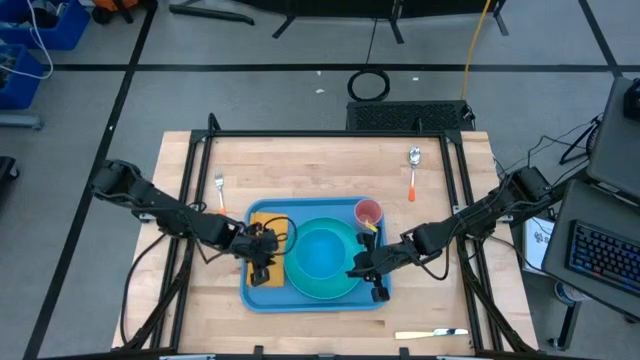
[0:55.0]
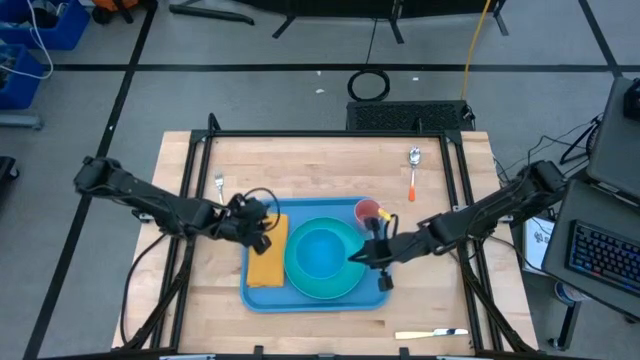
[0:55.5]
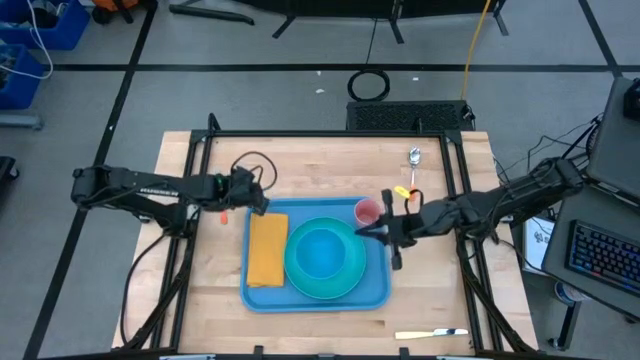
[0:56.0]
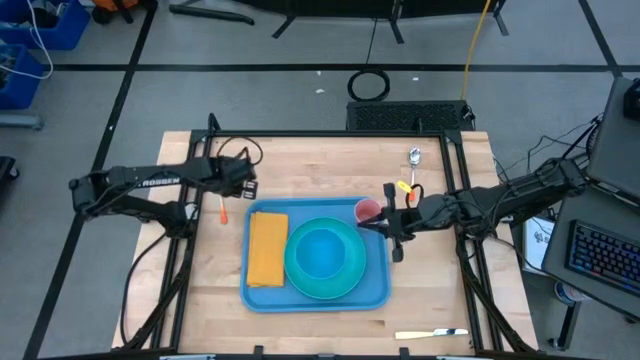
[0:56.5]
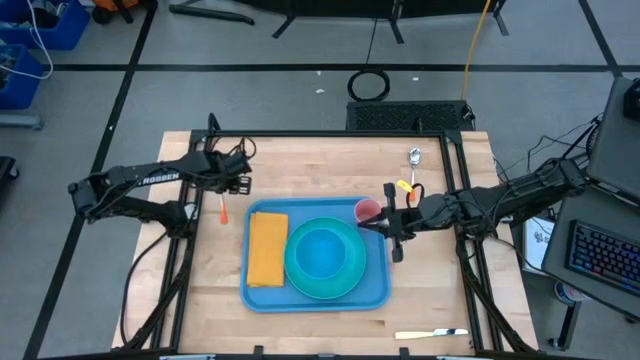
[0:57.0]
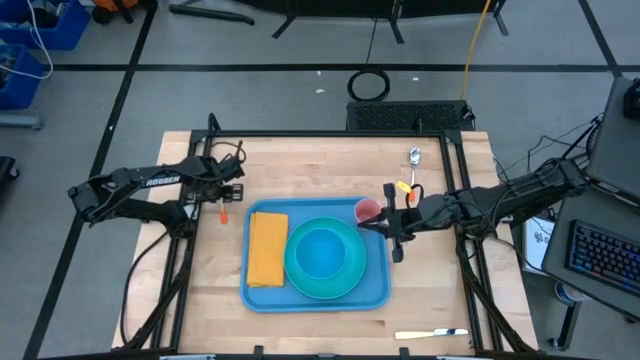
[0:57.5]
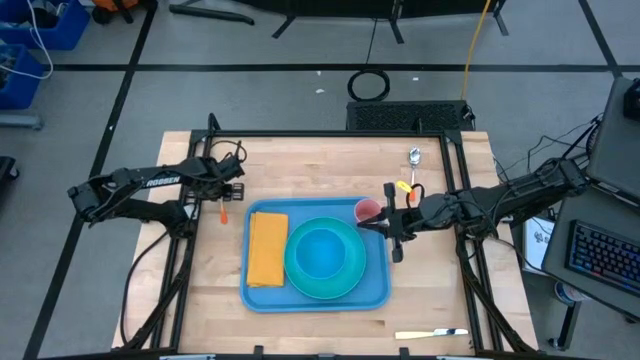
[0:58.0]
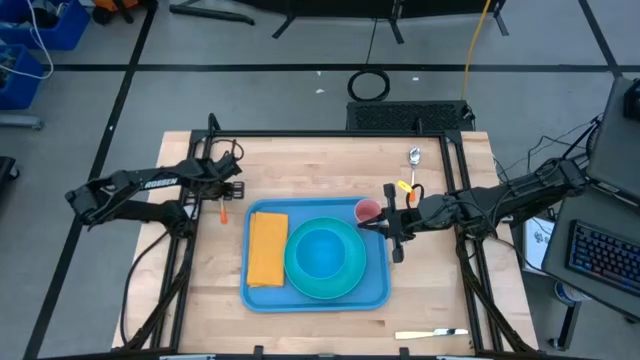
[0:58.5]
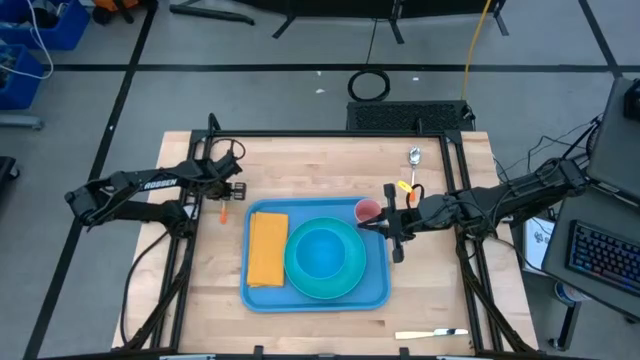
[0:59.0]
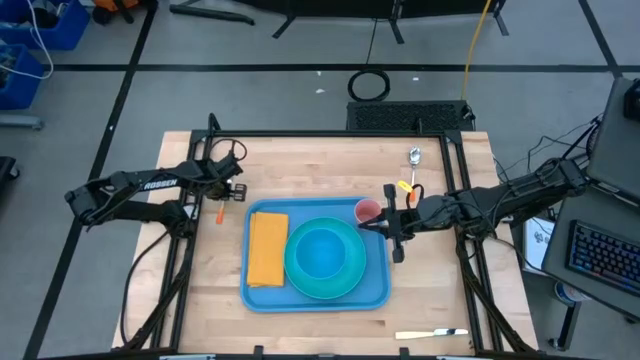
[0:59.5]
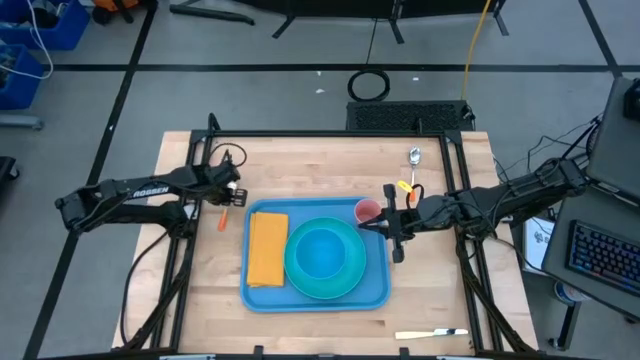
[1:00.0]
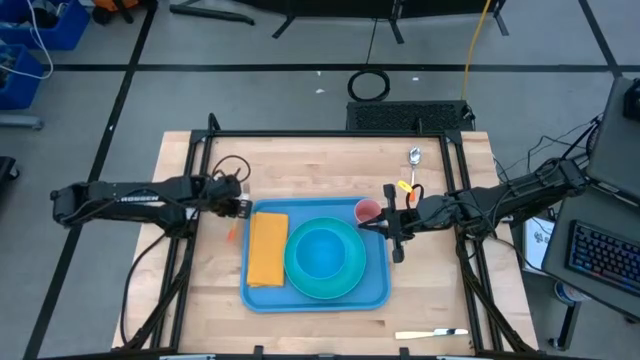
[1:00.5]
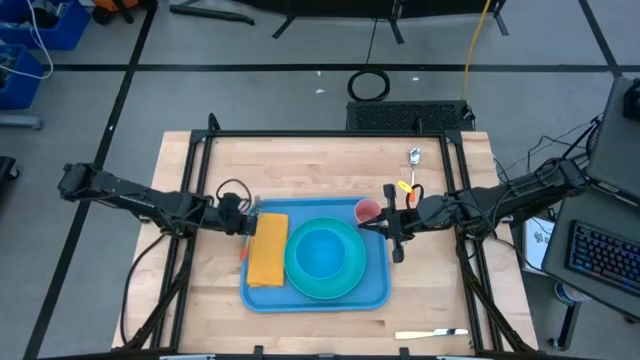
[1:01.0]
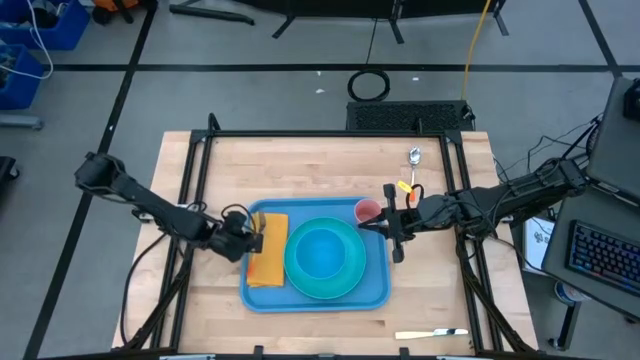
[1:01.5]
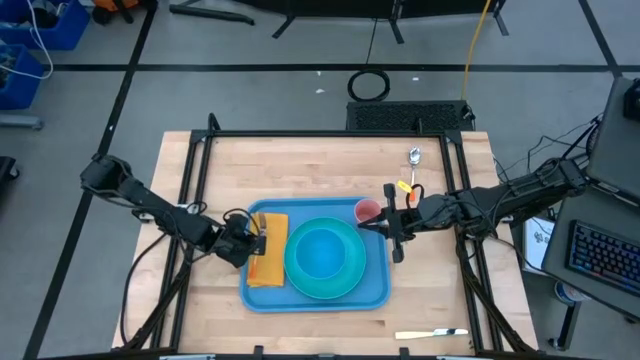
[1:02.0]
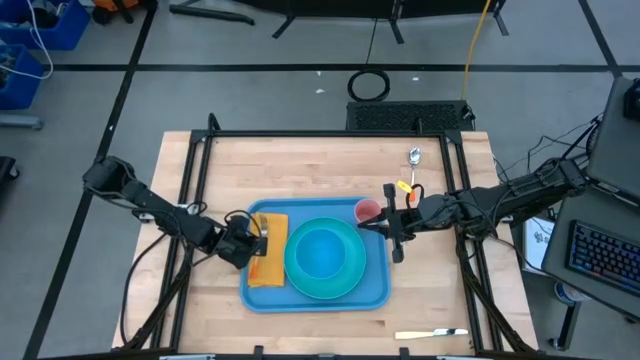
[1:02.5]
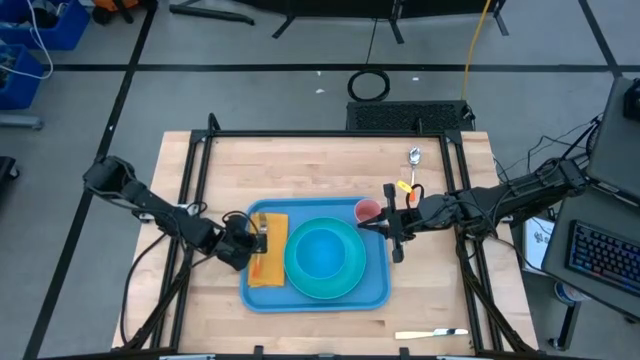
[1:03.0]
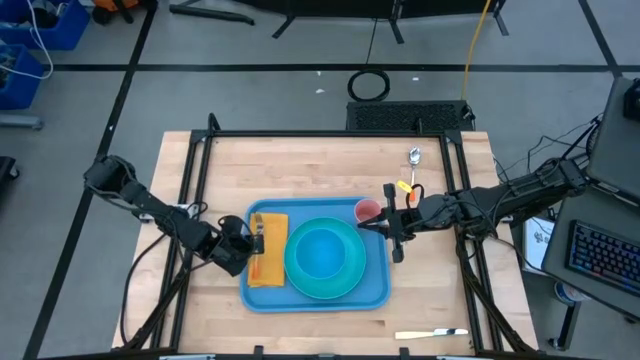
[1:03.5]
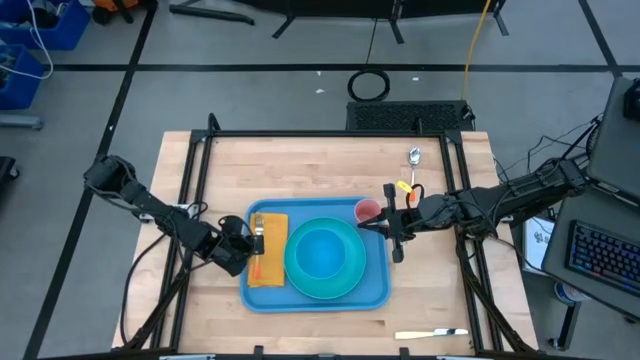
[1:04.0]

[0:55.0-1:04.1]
Task: Set up tray
Put the fork on top of the yellow napkin

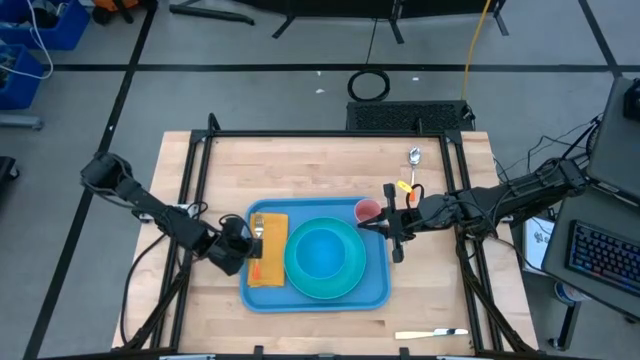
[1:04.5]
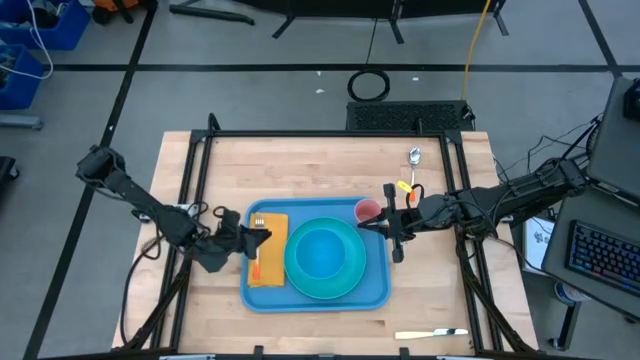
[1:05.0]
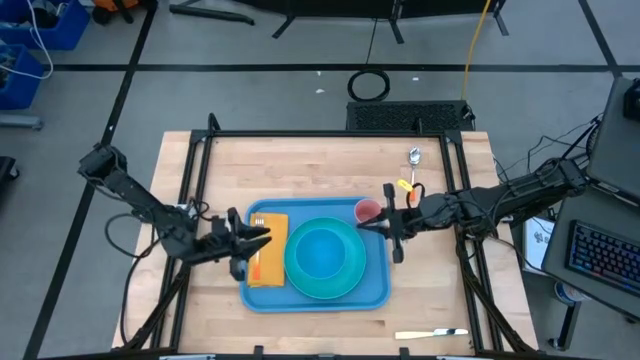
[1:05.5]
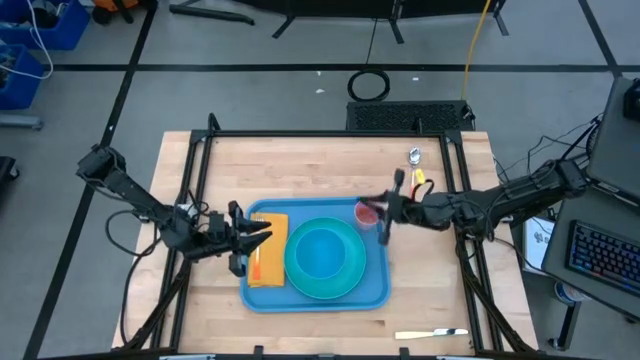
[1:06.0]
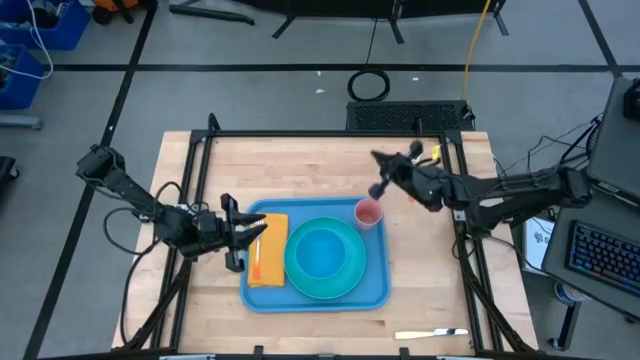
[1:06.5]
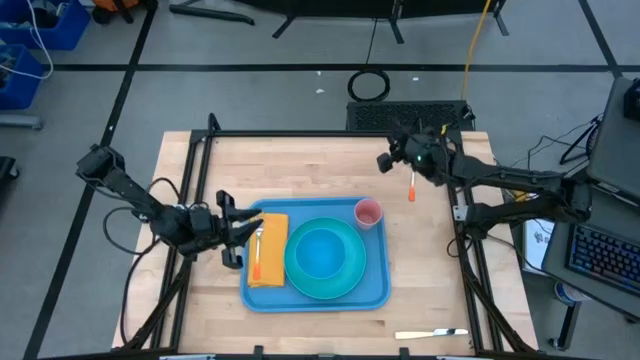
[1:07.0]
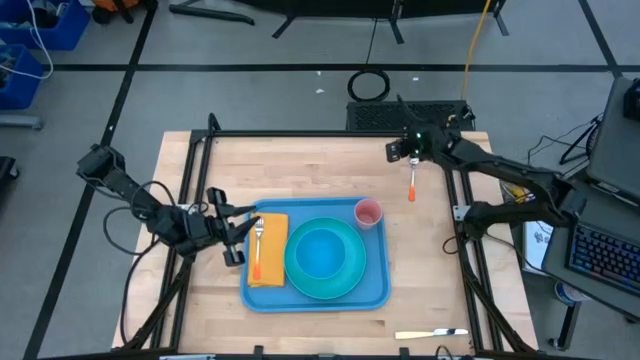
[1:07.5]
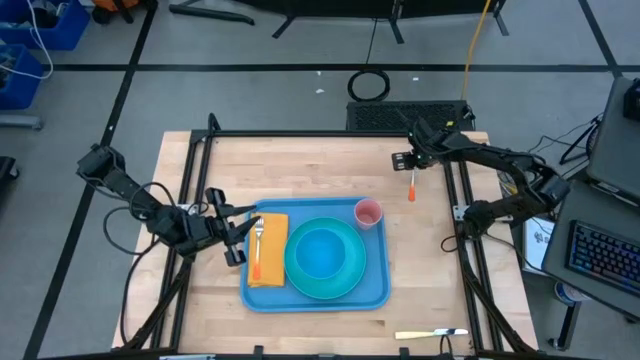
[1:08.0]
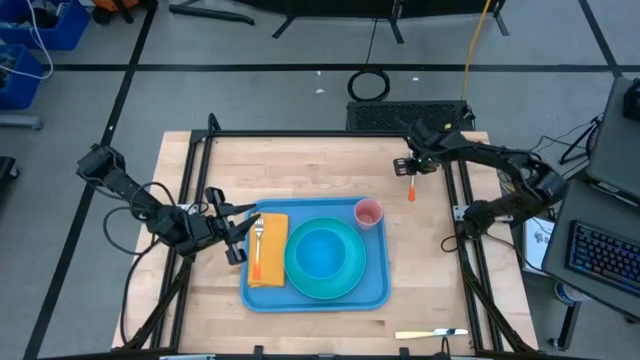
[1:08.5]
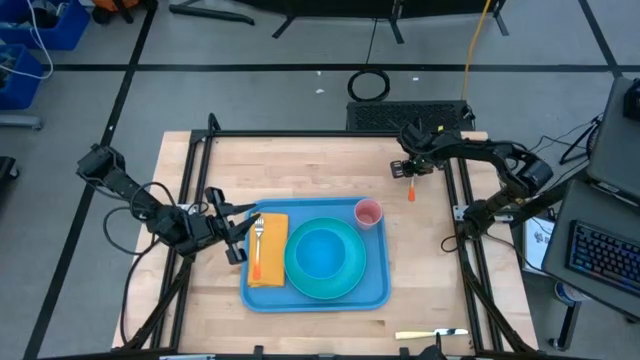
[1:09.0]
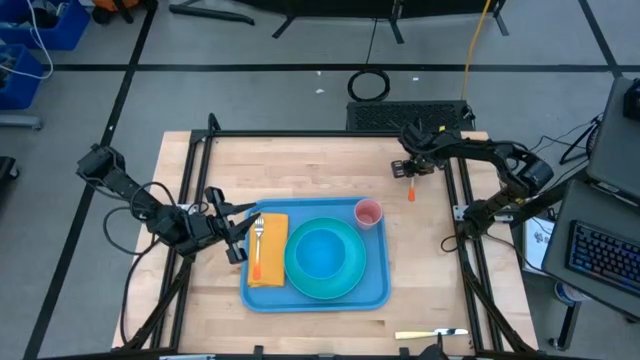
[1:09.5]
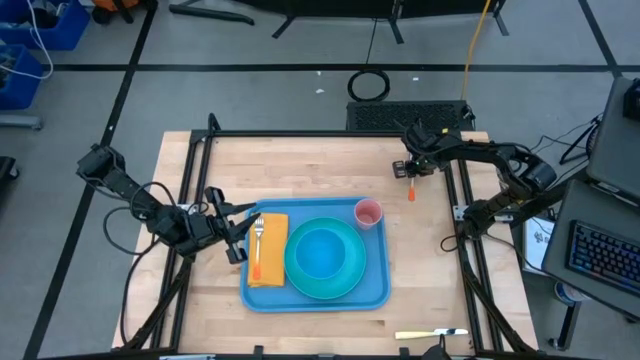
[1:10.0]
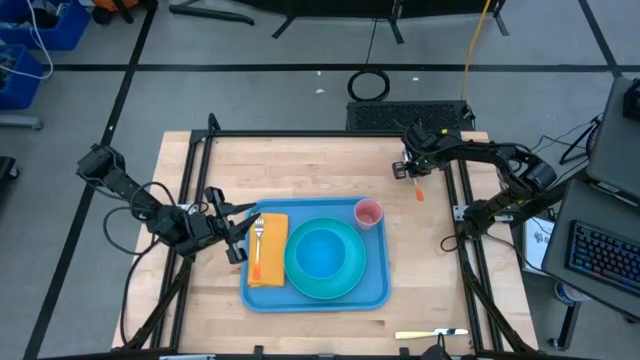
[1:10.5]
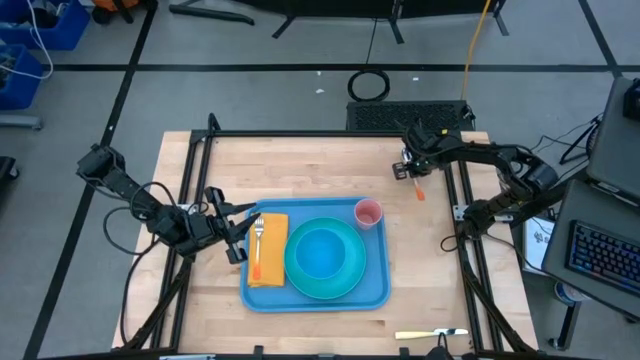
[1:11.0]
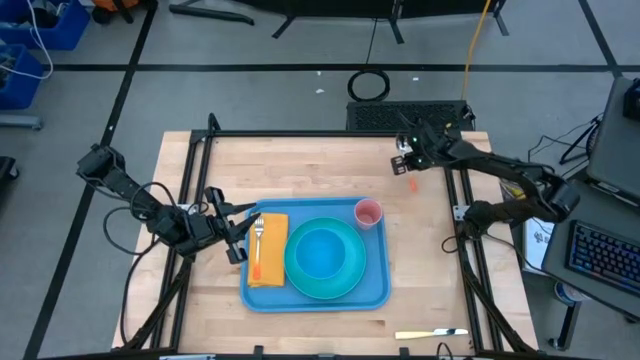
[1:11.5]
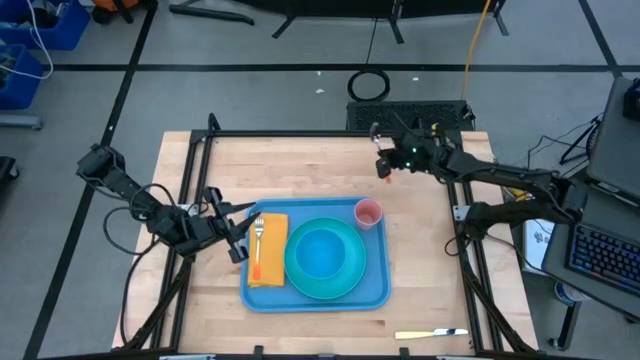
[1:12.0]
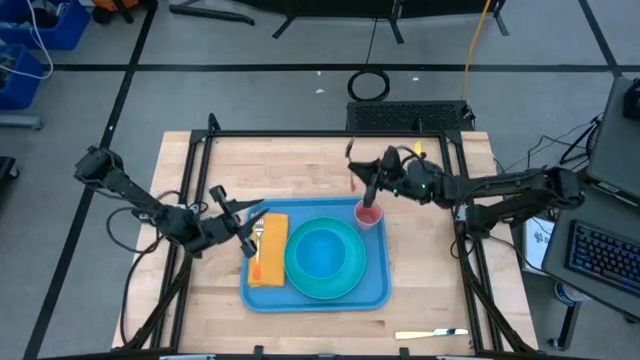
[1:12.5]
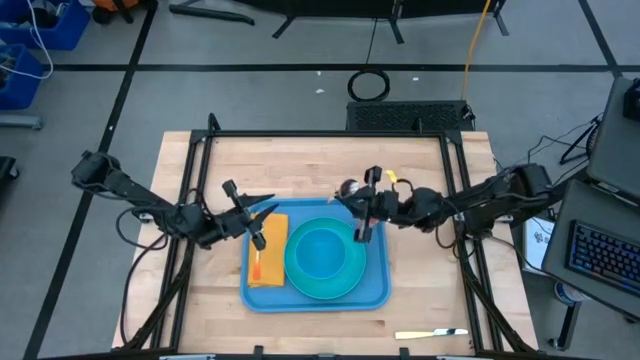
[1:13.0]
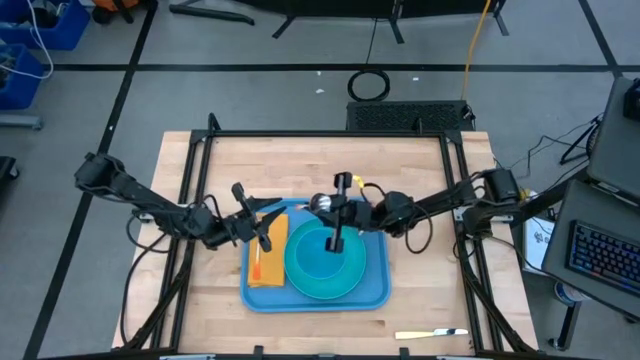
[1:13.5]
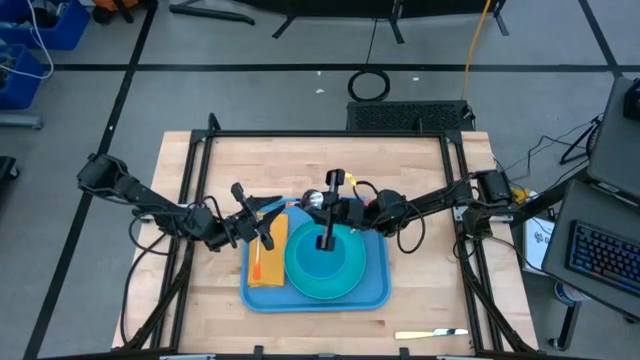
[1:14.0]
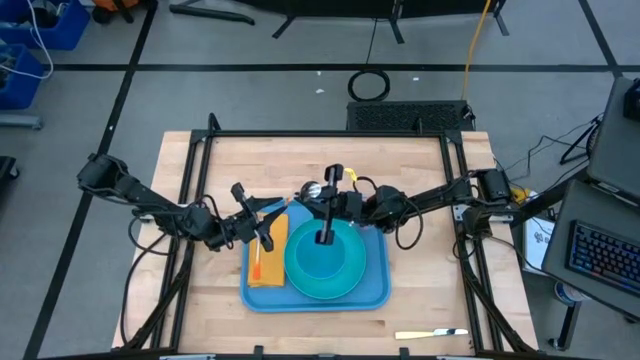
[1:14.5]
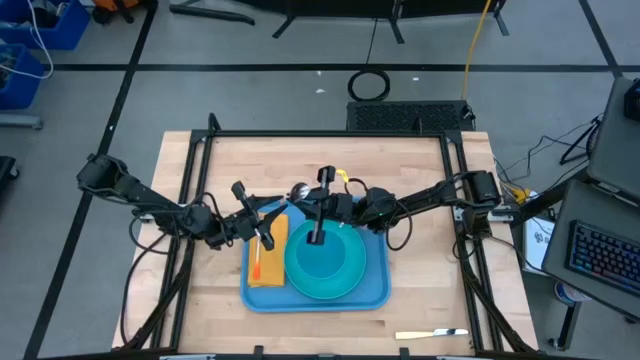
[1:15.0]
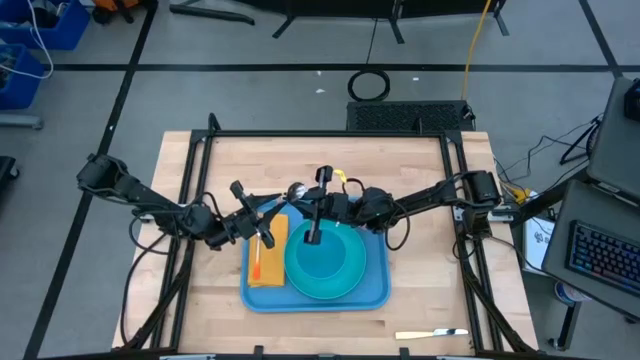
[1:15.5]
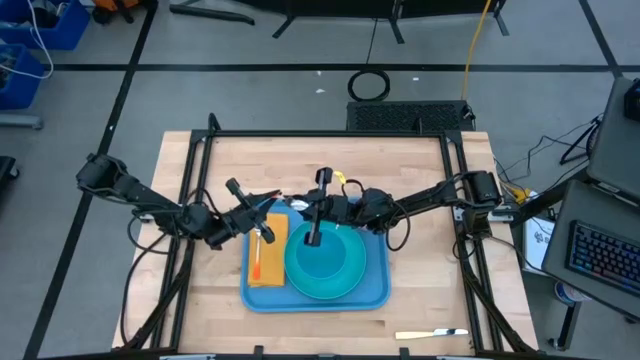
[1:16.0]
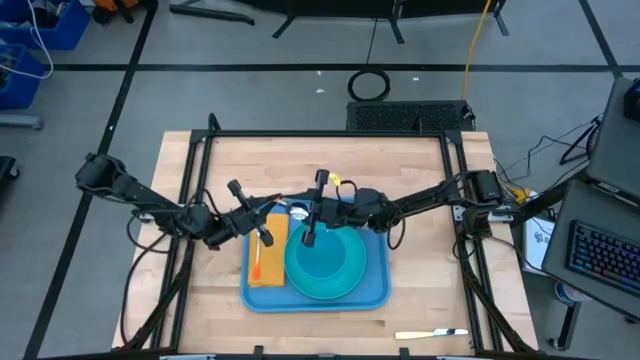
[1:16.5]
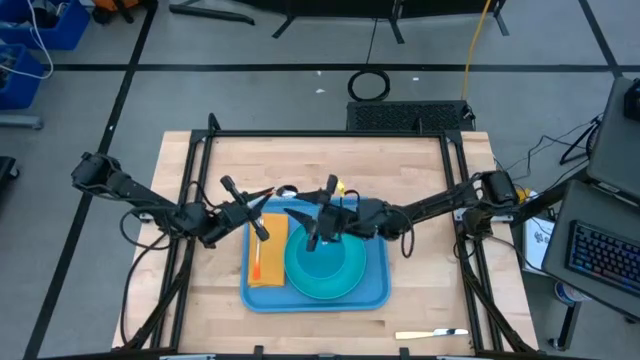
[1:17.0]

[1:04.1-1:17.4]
Put the spoon on top of the yellow napkin beside the fork
